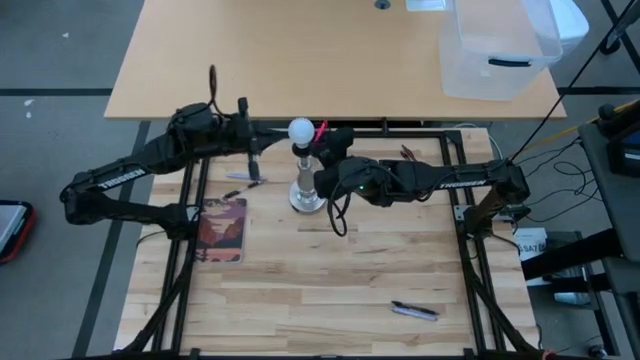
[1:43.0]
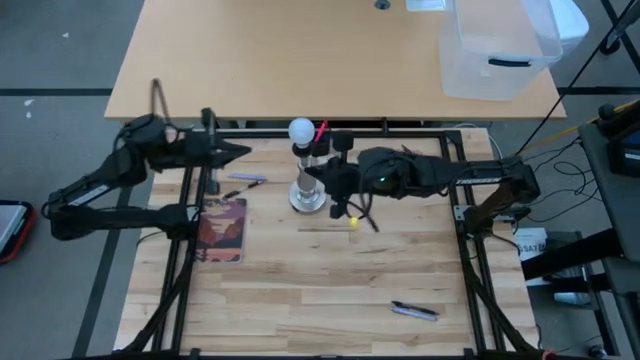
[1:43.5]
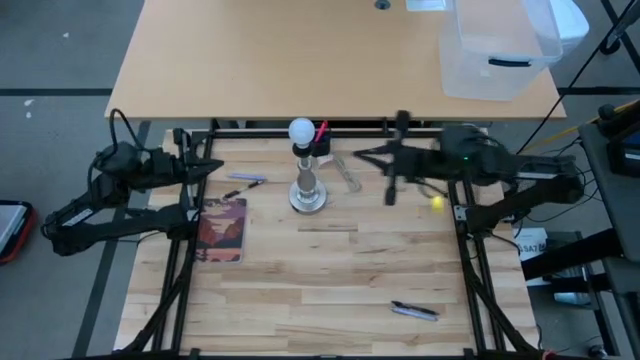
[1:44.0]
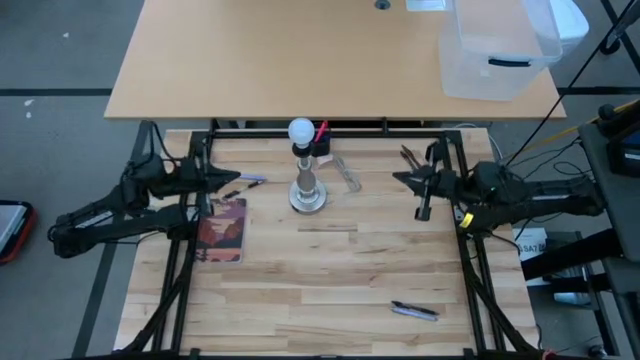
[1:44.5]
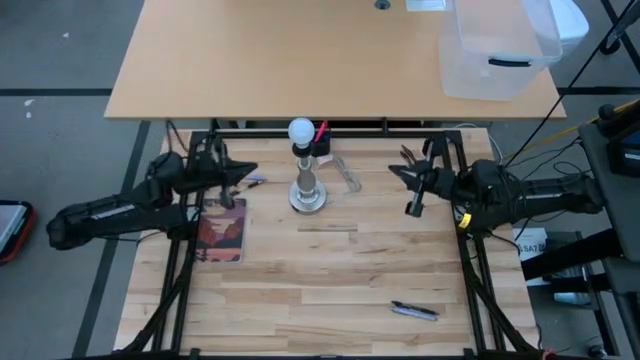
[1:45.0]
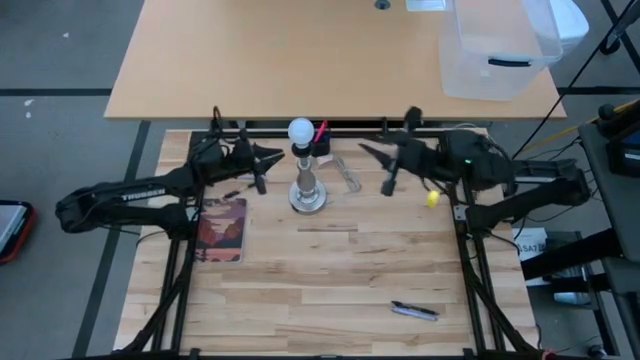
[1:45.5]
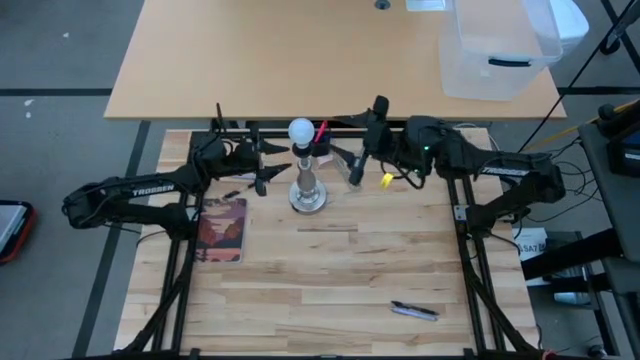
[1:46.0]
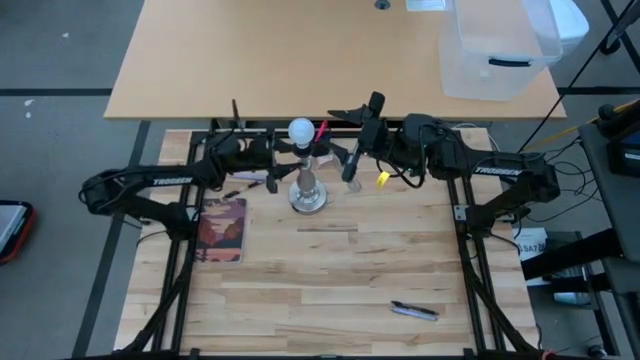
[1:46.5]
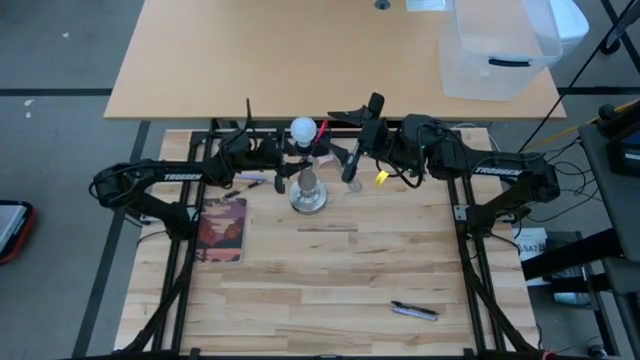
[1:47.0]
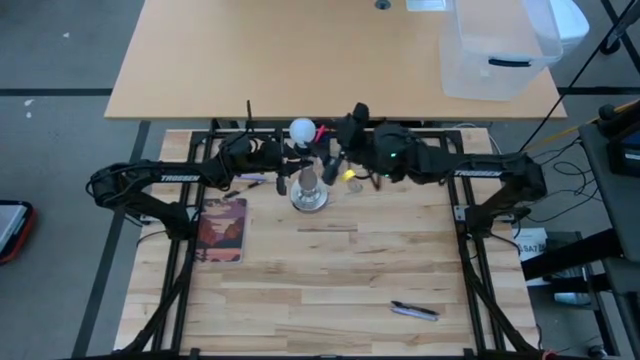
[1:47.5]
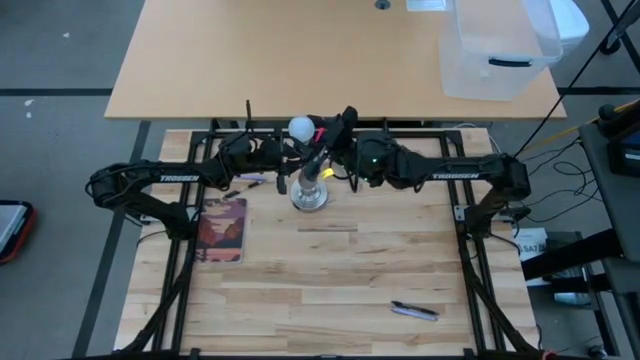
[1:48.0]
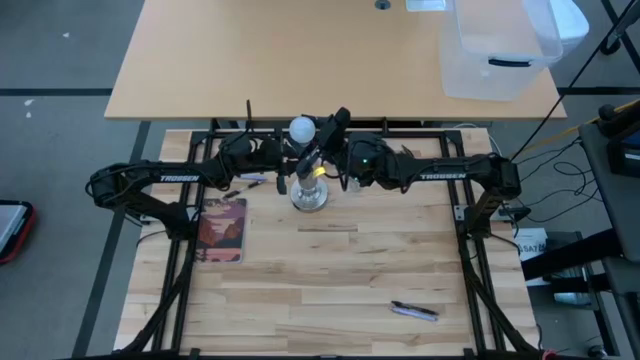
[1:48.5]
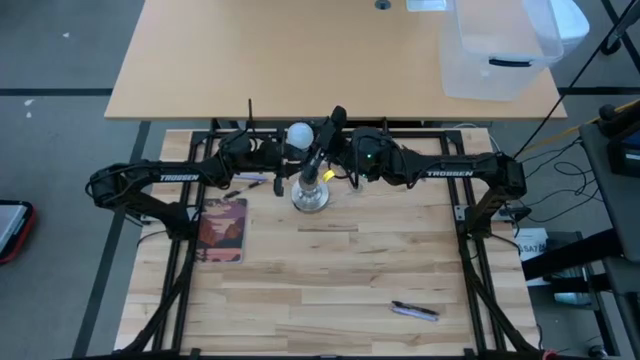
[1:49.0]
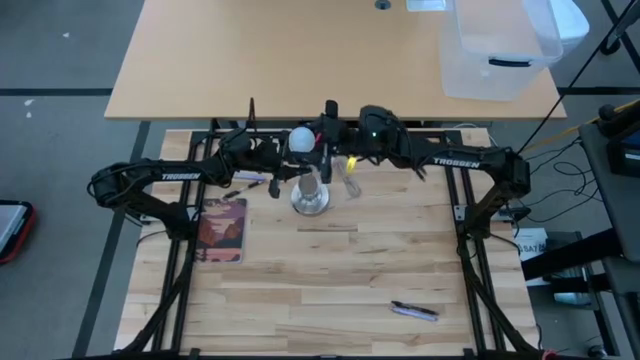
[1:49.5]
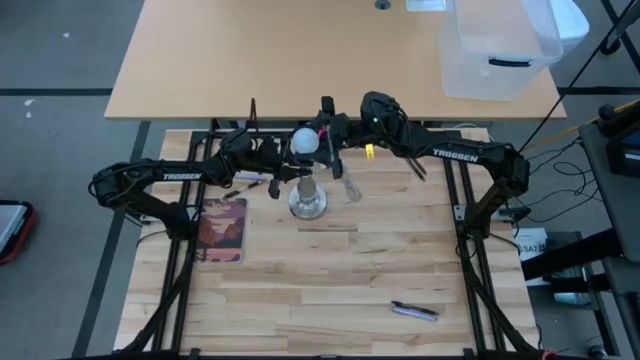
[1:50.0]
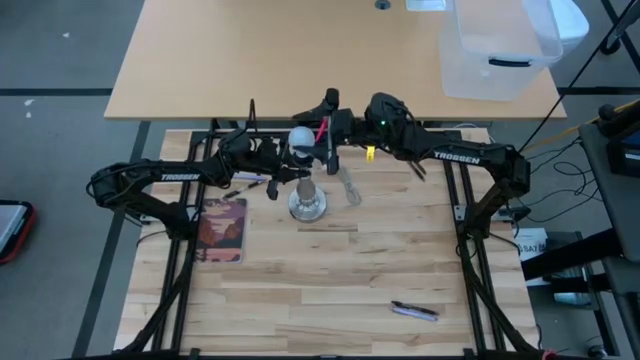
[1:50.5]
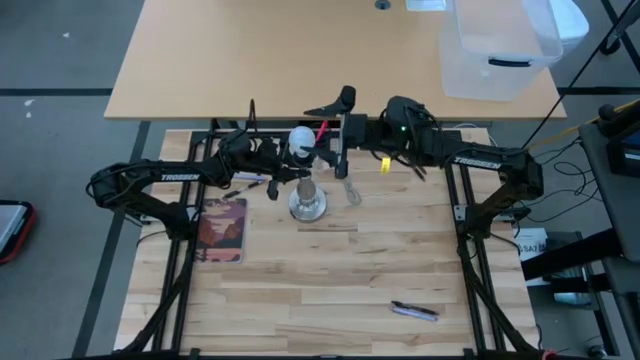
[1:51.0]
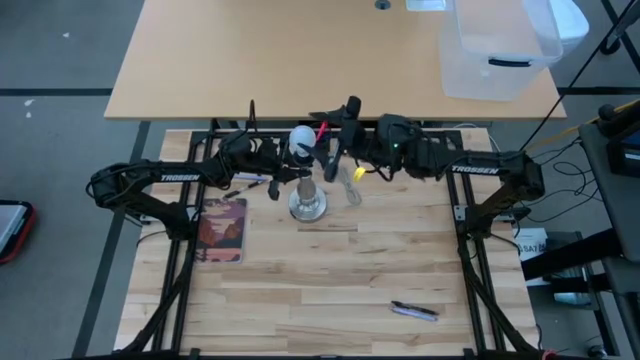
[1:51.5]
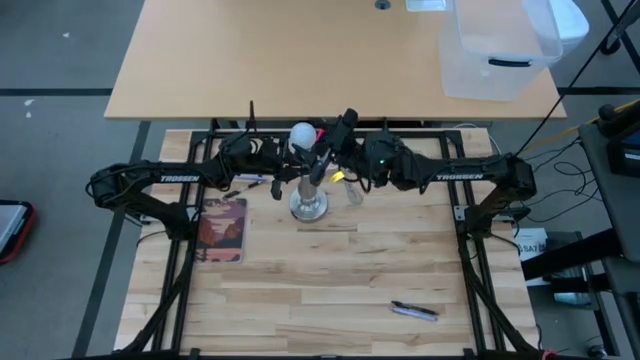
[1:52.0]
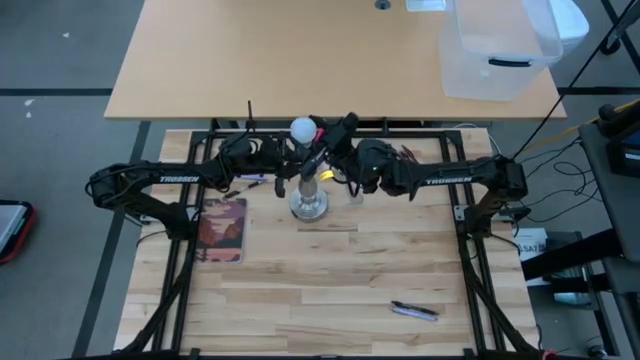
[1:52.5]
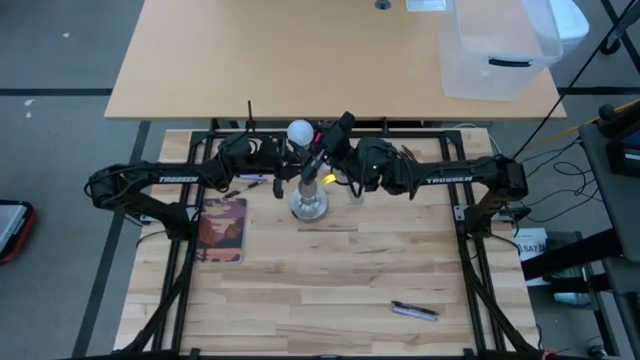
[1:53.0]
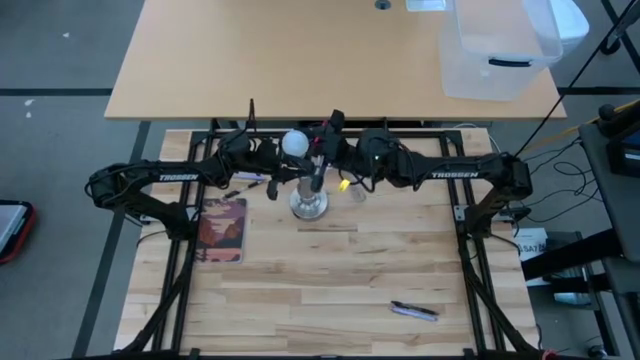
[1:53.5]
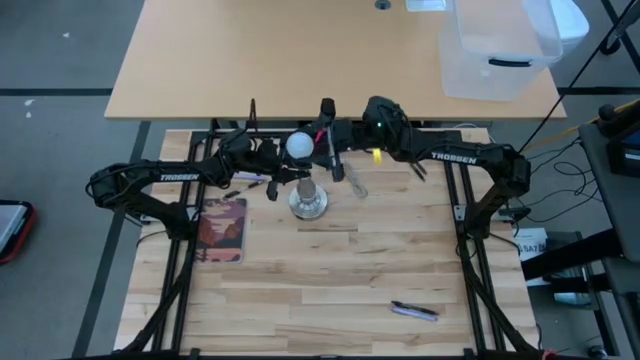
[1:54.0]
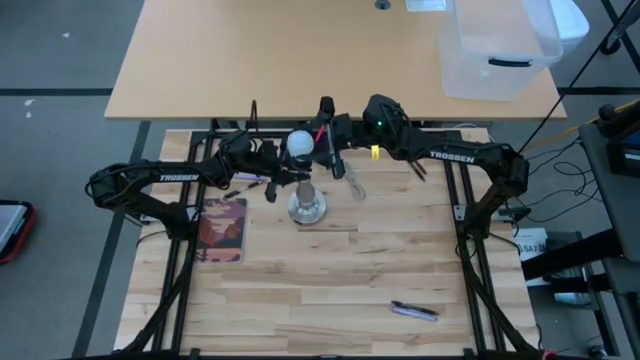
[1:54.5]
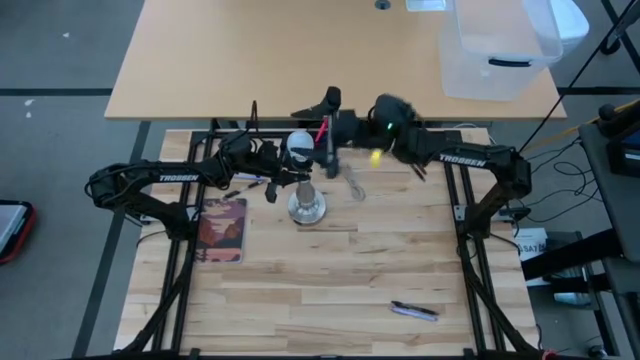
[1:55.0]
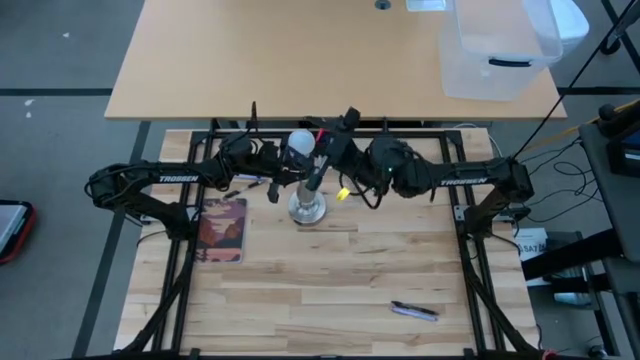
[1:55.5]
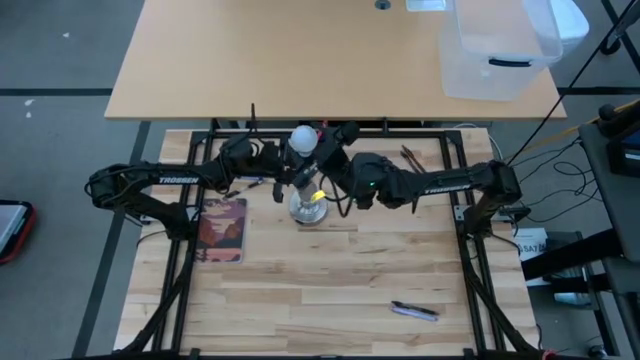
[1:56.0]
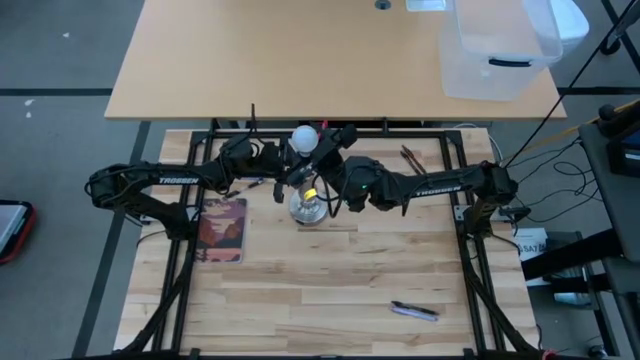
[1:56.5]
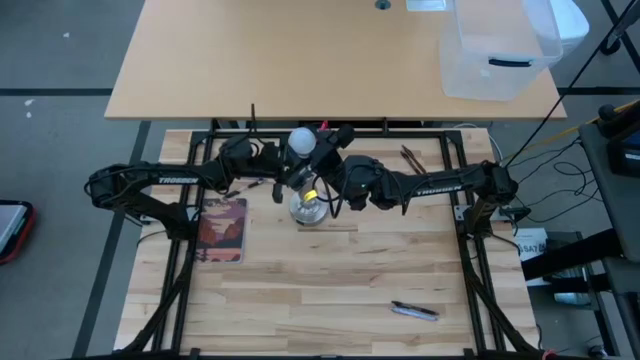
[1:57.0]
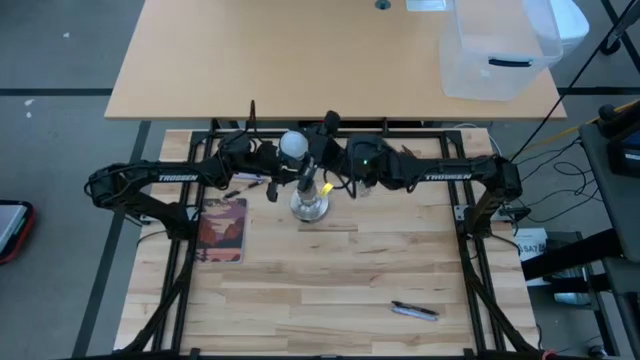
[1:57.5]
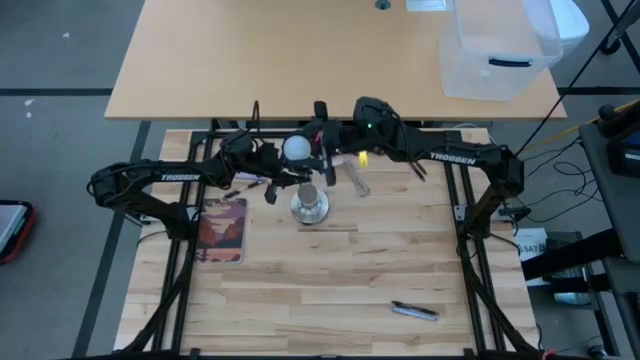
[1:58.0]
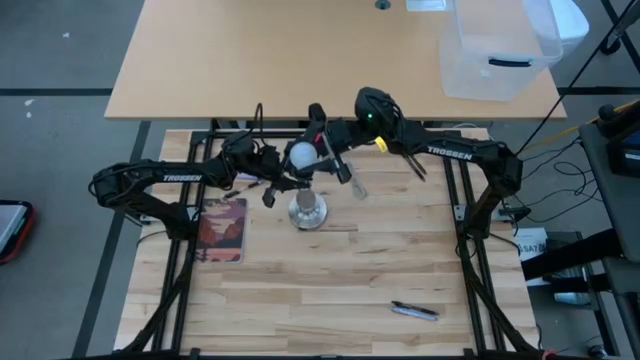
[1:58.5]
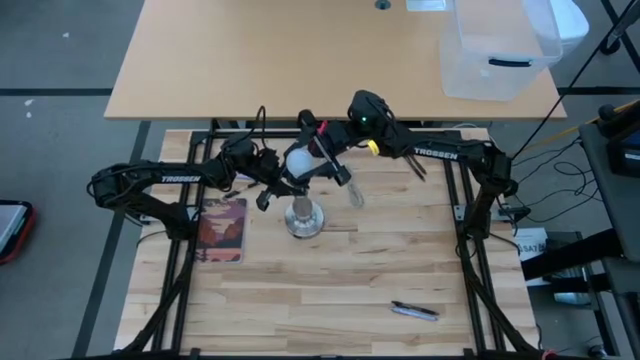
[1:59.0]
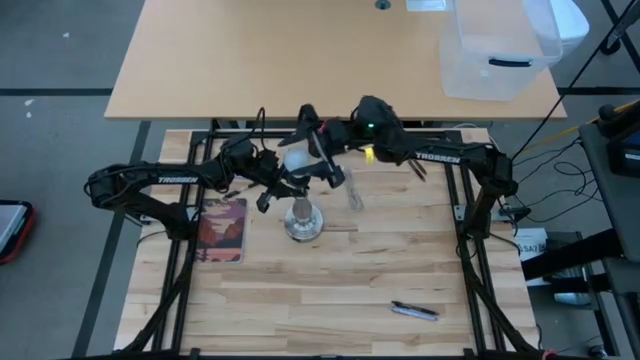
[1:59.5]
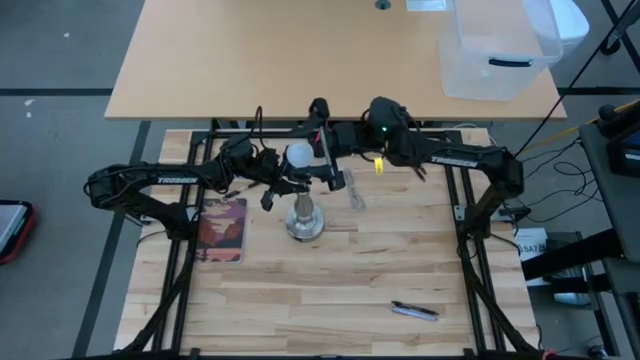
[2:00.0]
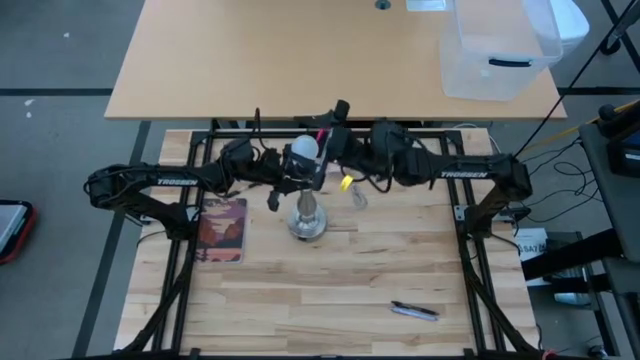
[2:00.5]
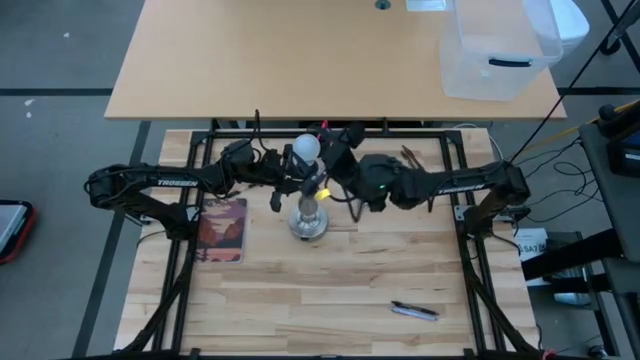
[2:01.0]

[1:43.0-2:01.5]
Task: Screw lightbulb
Remove the lightbulb from the desk lamp

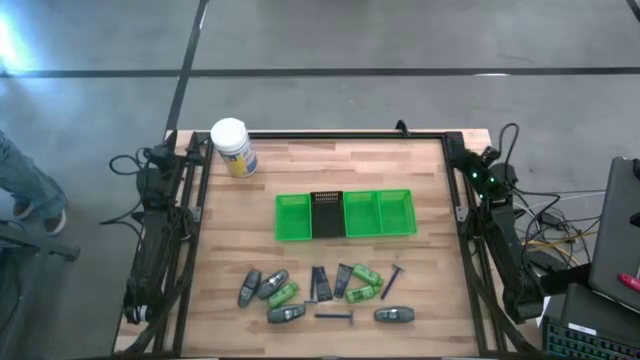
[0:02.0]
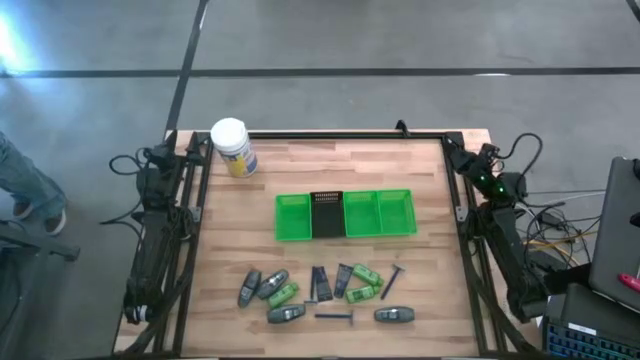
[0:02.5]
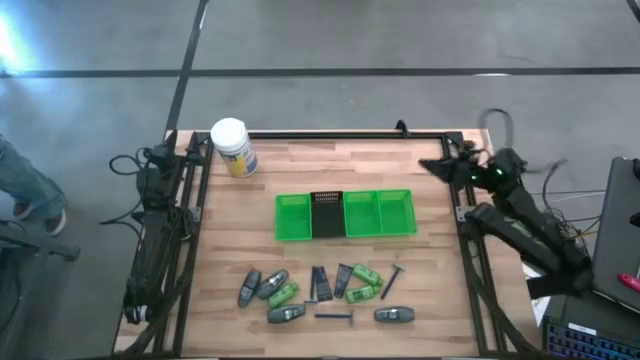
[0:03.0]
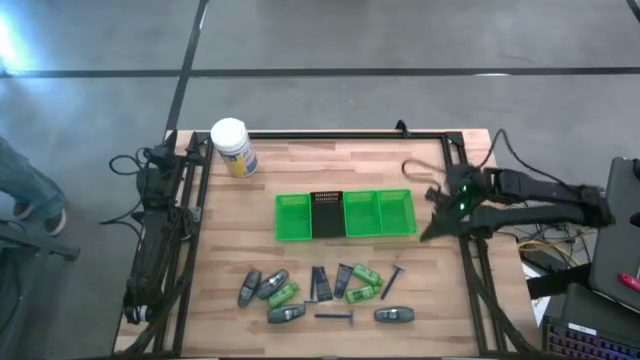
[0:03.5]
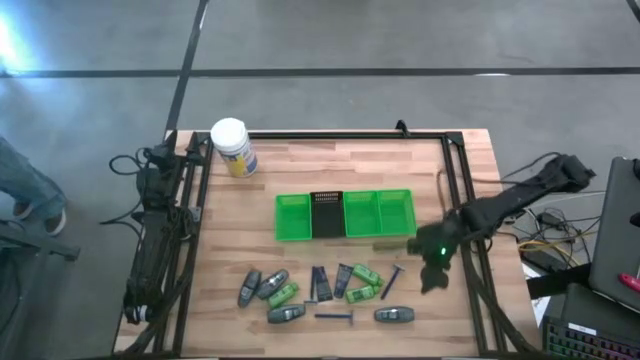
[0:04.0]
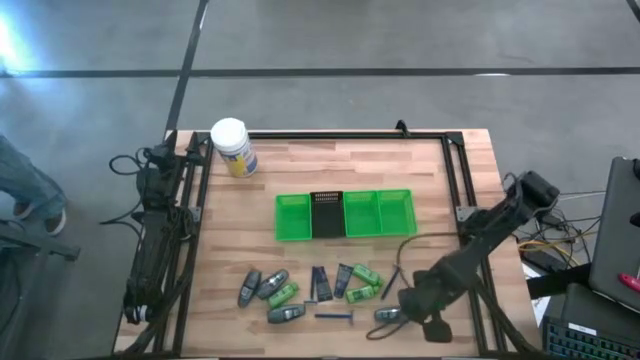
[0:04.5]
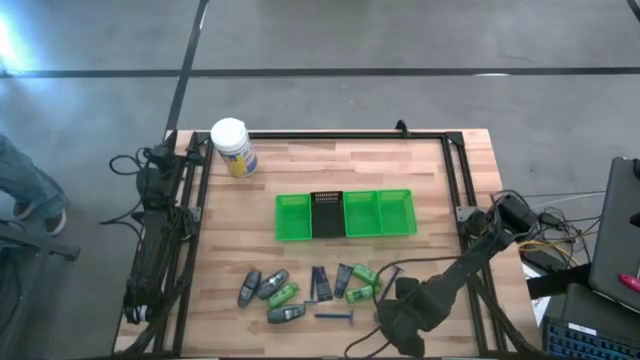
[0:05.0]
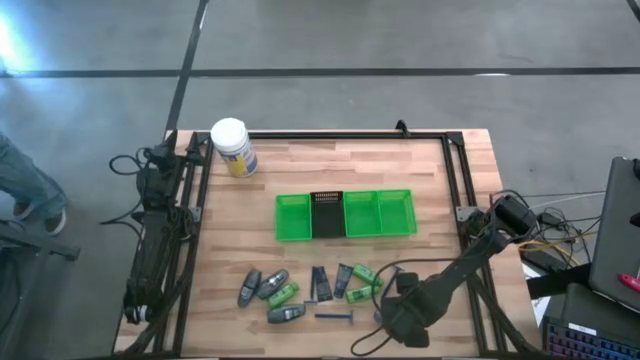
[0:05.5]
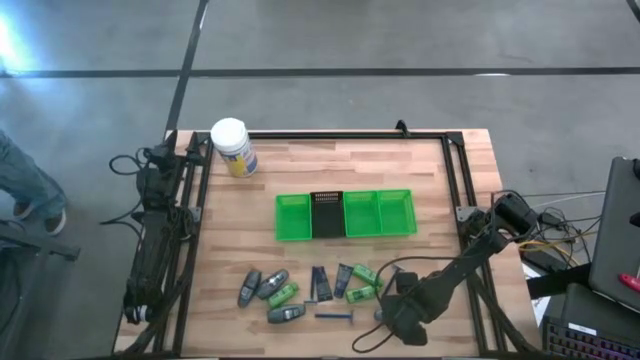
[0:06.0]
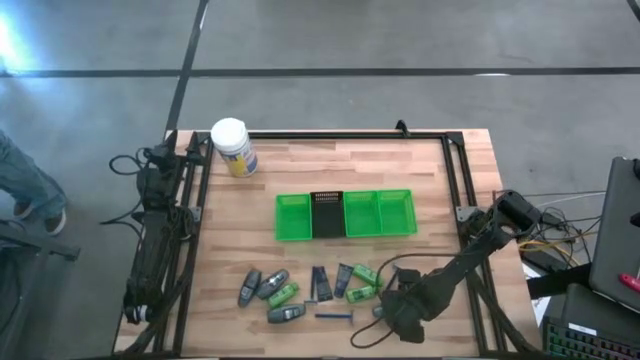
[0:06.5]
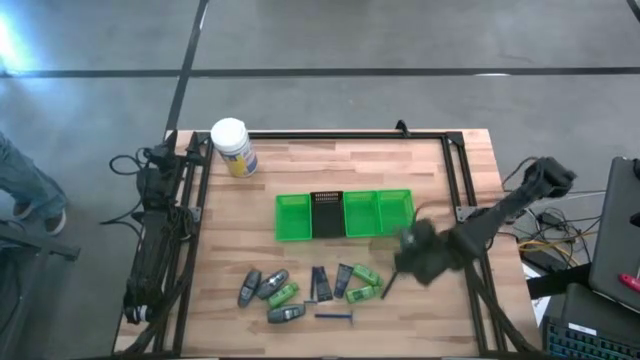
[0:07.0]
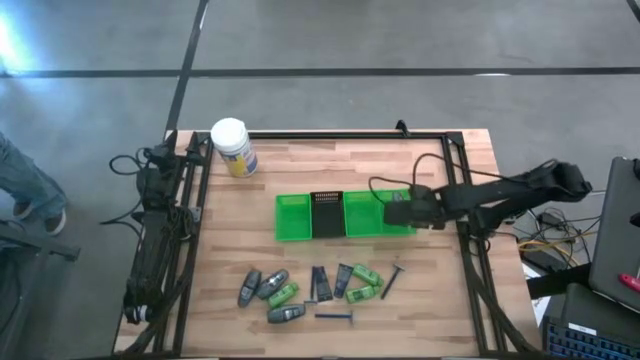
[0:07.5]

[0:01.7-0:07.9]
Task: Pick & Place Travel size toiletries
Put the black deodorant into the right green basket
